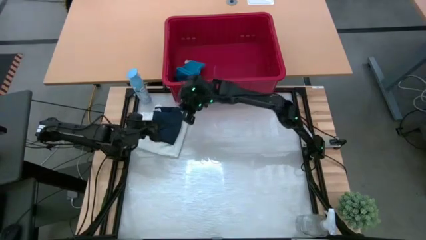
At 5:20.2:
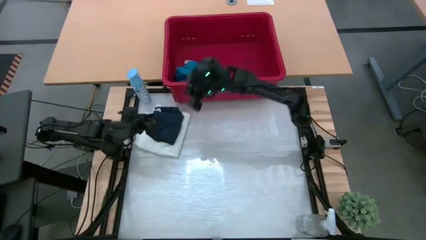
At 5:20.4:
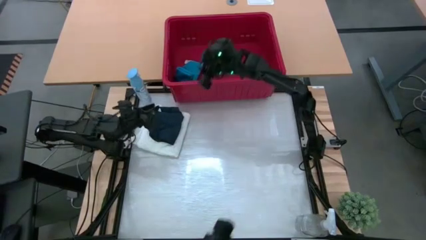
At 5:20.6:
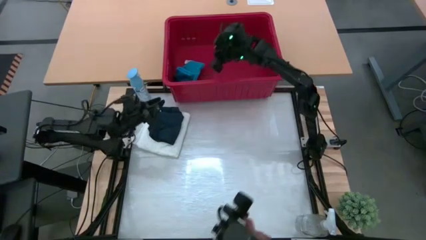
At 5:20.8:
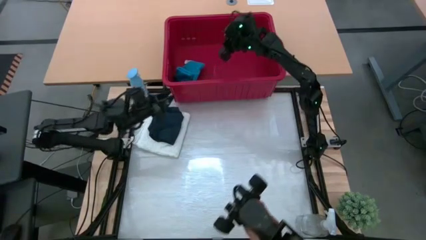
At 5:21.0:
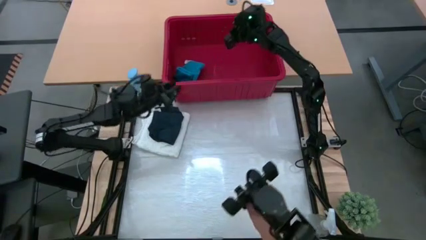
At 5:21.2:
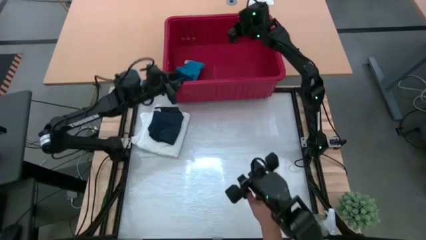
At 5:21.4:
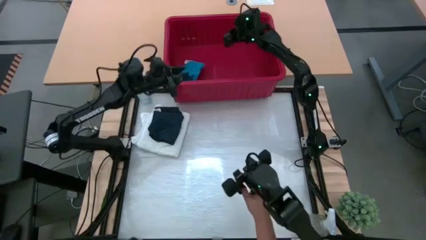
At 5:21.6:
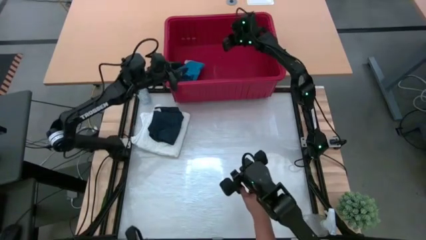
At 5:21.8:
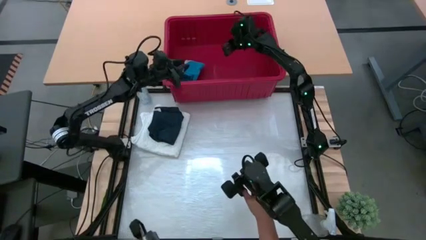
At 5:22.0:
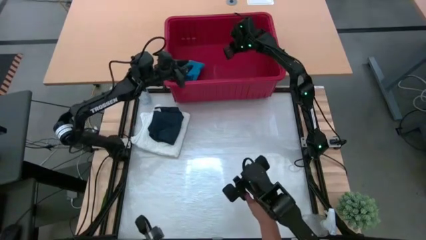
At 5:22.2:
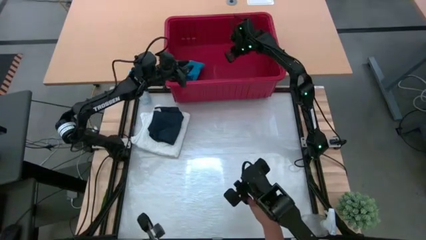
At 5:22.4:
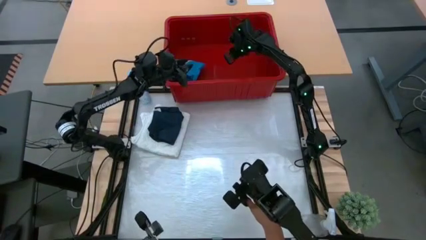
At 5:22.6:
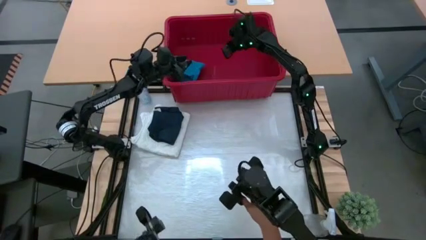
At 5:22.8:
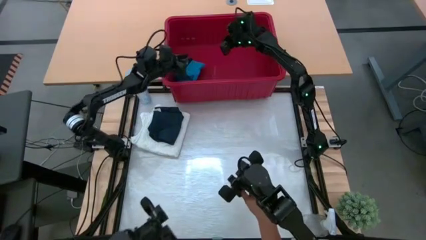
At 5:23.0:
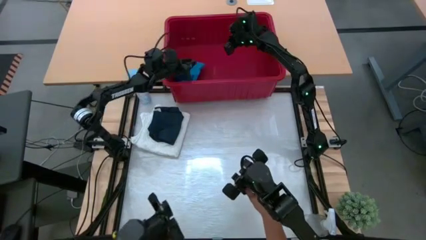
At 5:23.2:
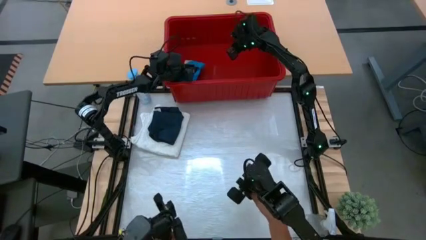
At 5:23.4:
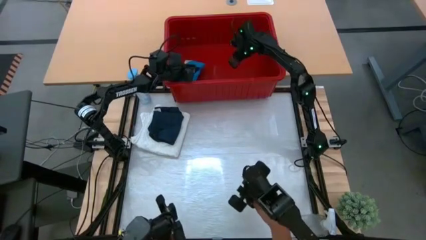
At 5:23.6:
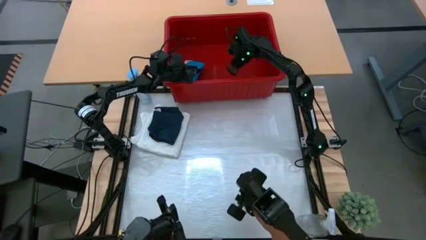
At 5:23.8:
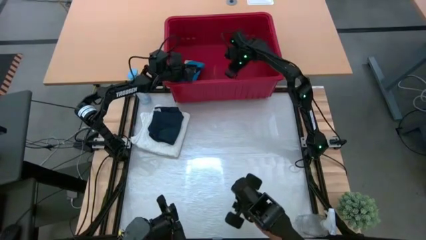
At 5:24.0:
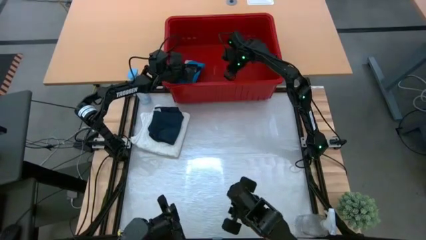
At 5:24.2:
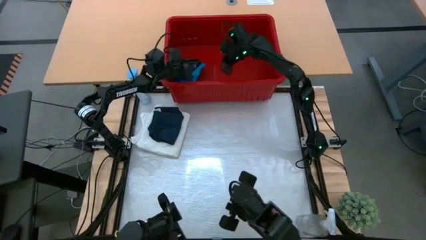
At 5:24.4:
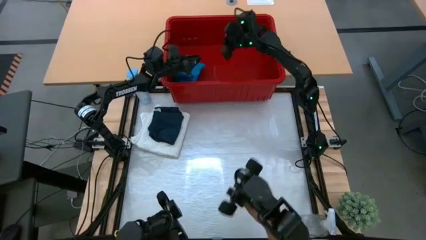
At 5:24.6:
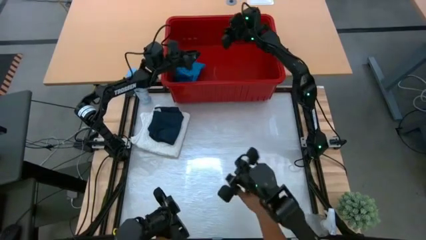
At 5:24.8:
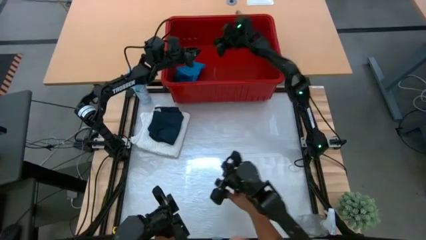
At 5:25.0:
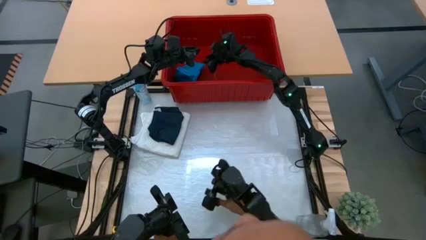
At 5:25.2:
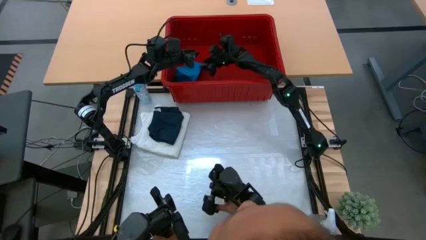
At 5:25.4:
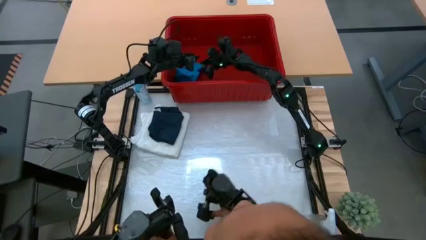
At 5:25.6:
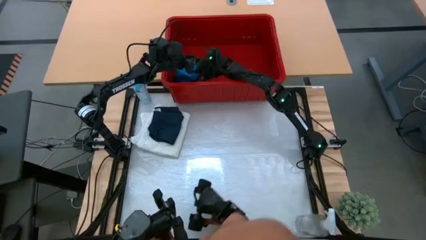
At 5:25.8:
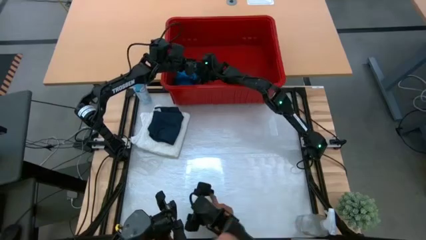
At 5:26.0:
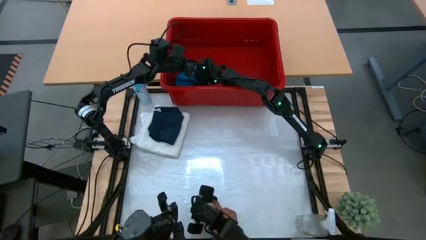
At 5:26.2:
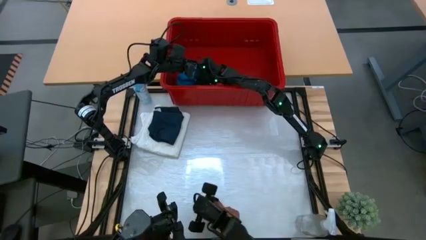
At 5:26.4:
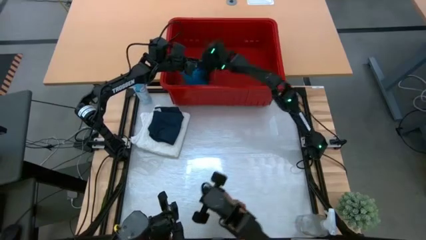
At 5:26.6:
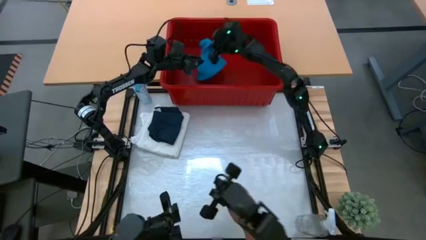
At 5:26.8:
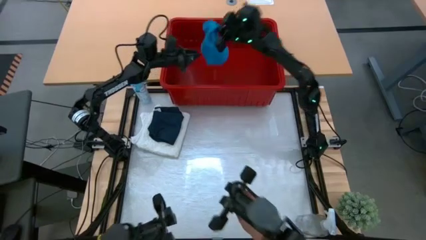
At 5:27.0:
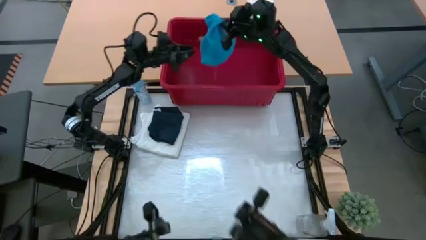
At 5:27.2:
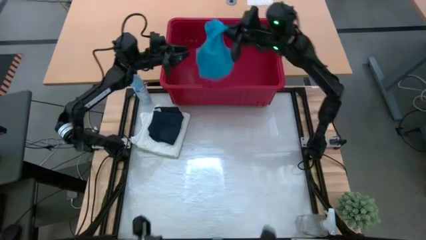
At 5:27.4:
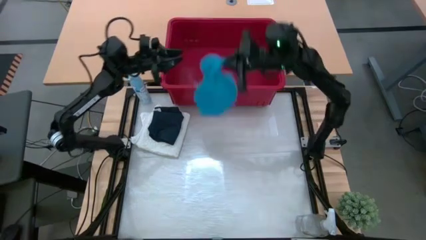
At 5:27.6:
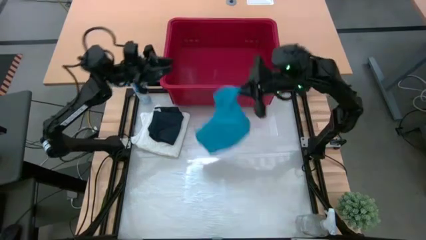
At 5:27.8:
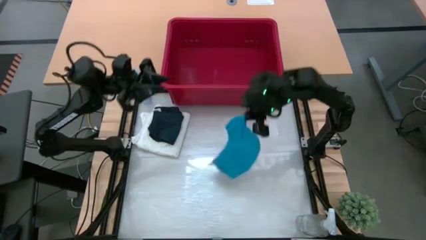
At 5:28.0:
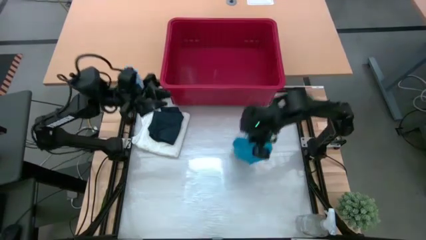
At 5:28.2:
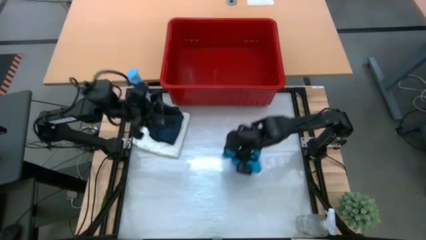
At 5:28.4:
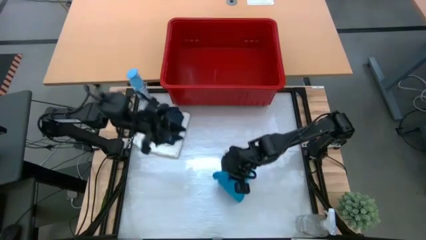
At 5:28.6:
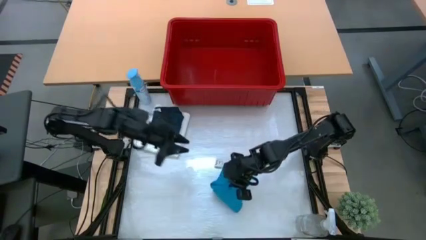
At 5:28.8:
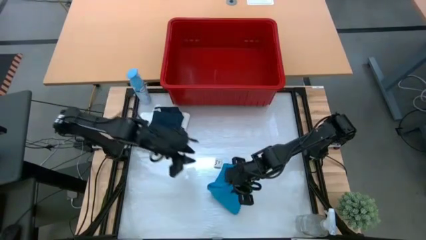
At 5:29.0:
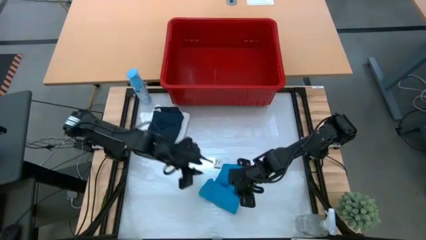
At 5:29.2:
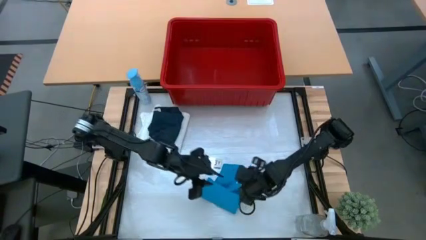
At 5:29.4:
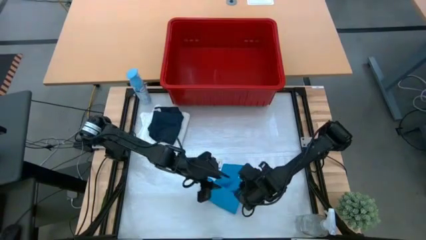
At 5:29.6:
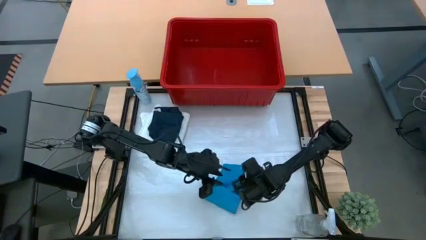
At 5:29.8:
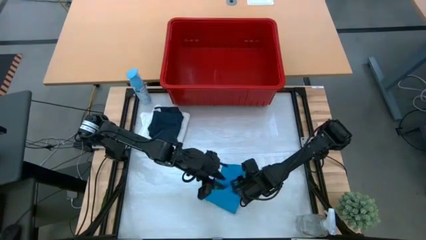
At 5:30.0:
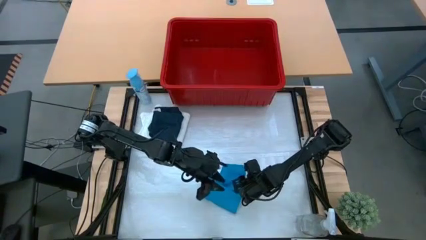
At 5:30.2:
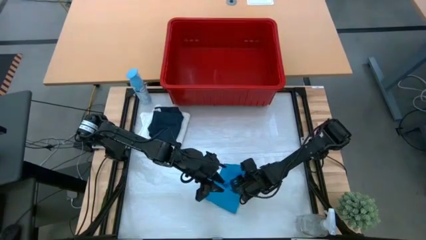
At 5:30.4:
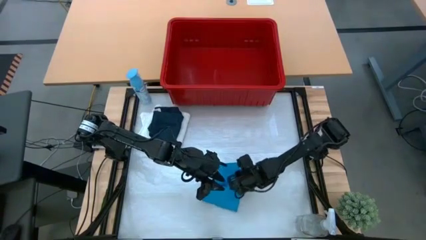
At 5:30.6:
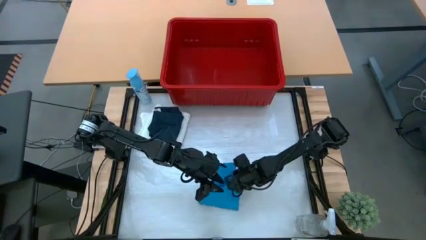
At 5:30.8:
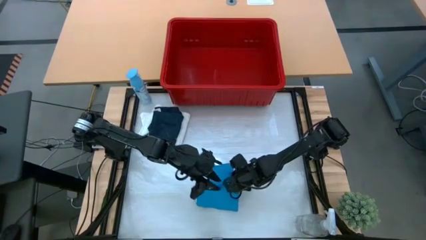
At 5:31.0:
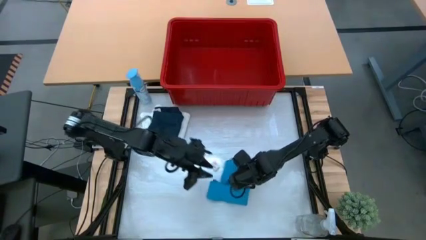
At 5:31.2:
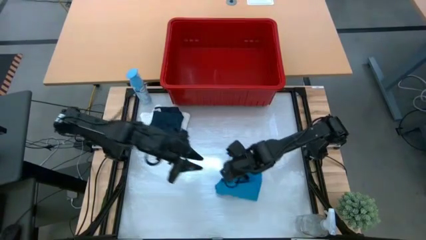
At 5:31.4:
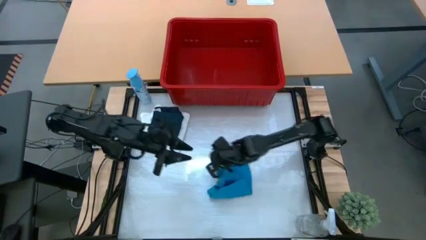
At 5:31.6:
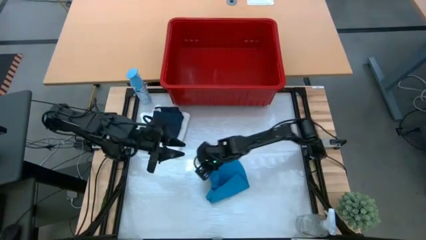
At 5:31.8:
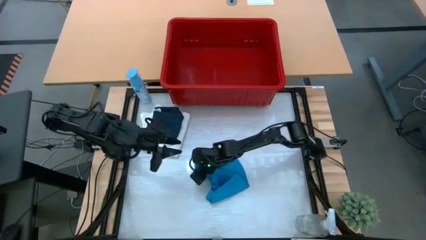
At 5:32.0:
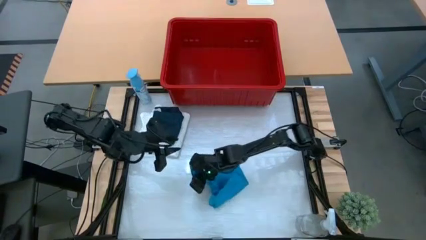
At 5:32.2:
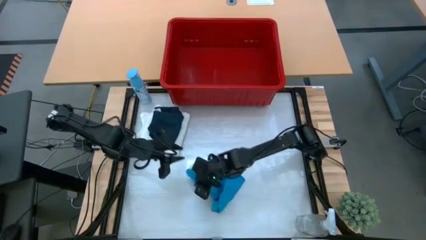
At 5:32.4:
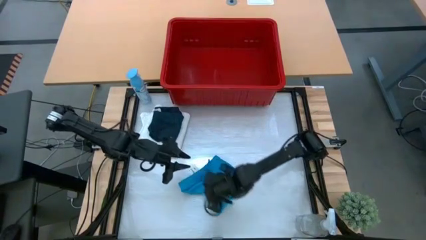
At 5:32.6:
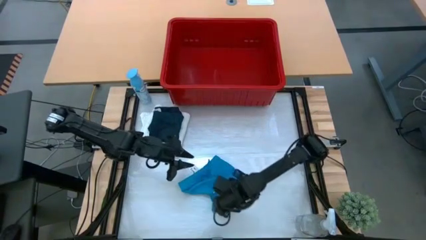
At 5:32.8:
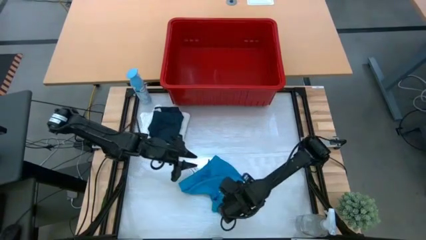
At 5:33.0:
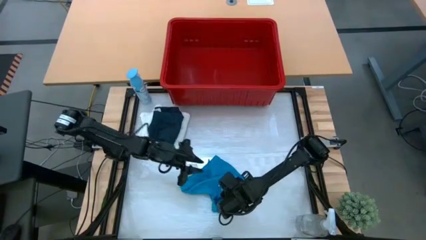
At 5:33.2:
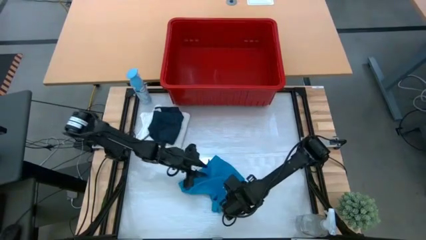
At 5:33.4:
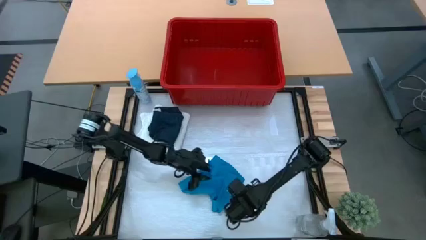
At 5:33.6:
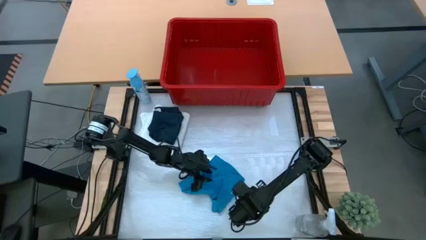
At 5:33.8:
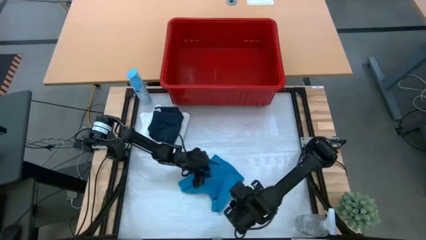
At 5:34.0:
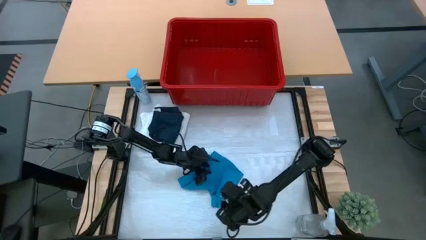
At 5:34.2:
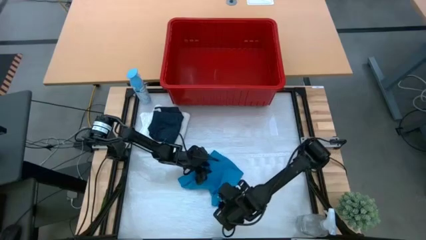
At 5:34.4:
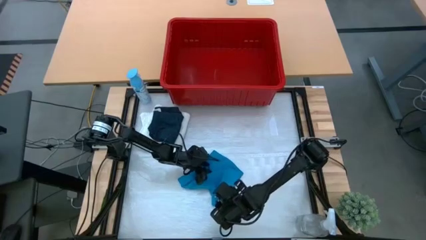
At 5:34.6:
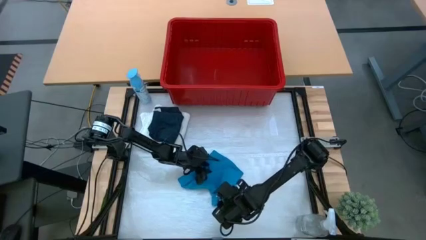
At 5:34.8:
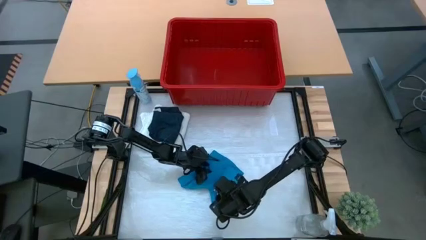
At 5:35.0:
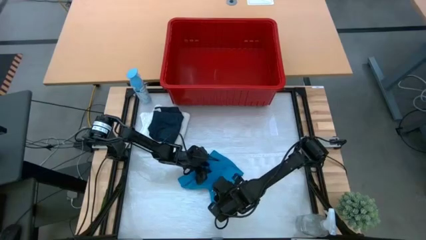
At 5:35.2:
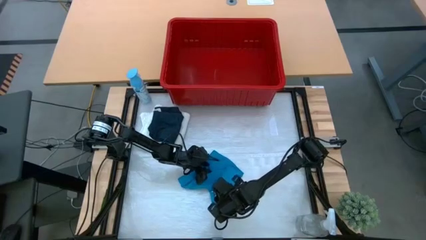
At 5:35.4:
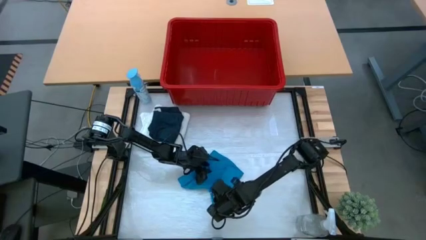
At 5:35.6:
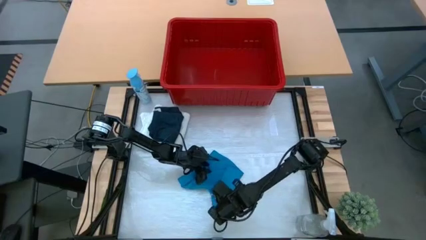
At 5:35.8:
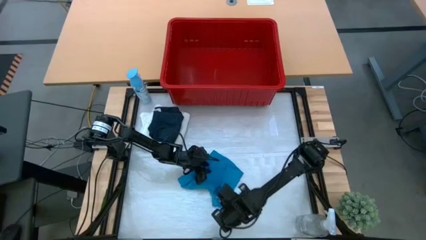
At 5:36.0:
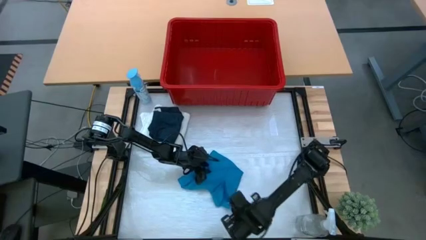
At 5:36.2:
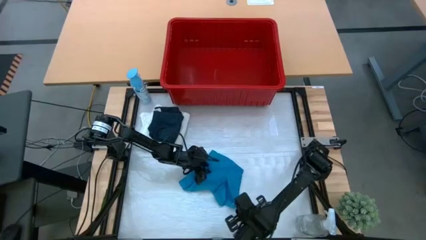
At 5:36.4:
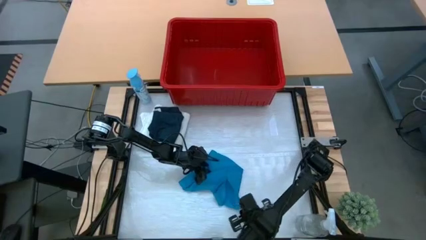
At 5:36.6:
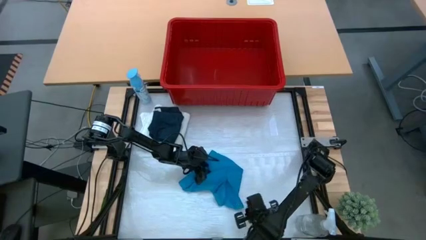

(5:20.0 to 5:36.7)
Task: Fold Laundry from Bin
Fold the blue shorts
